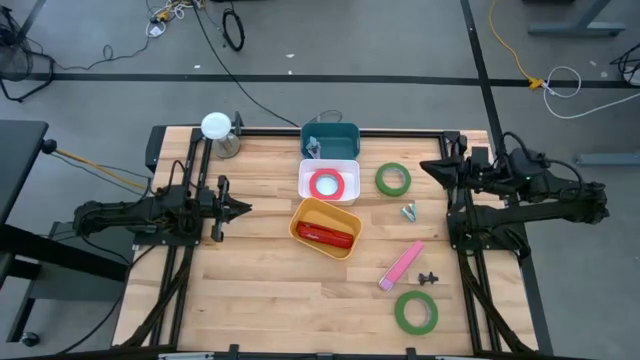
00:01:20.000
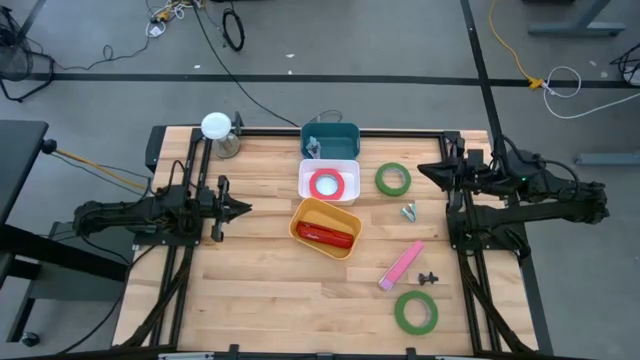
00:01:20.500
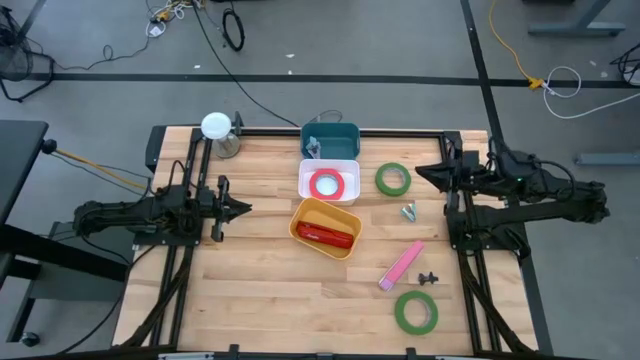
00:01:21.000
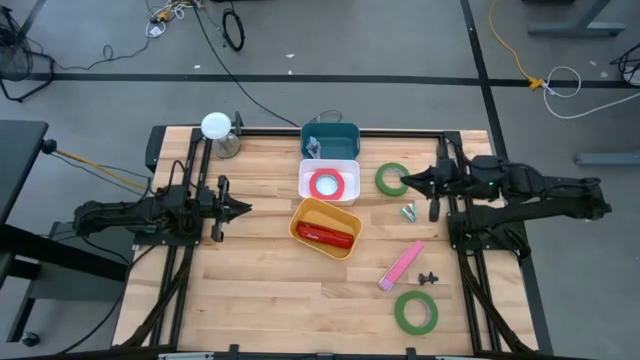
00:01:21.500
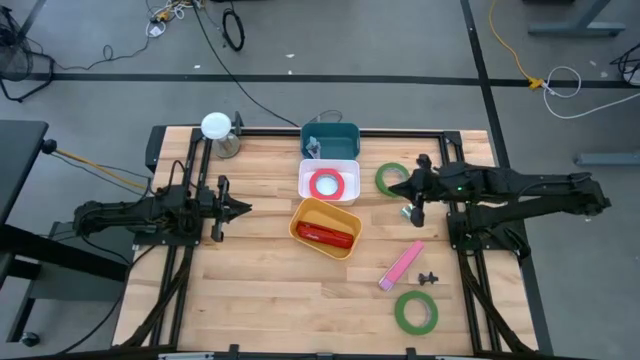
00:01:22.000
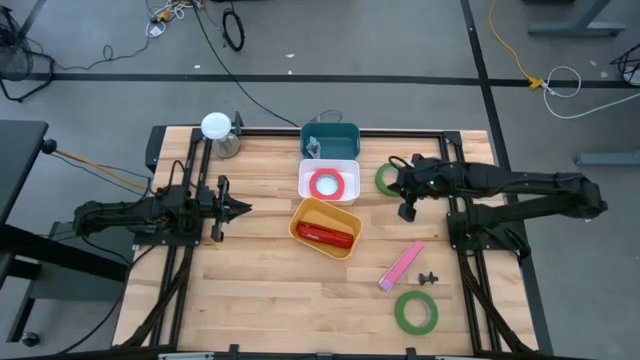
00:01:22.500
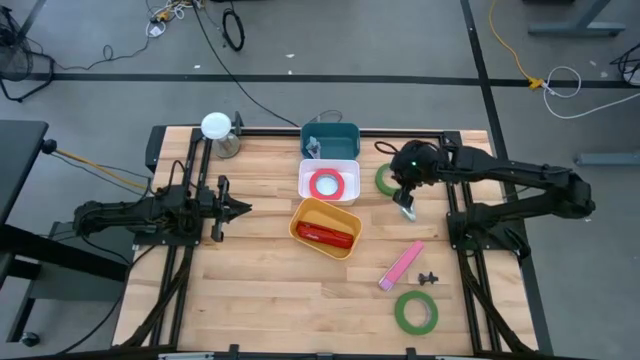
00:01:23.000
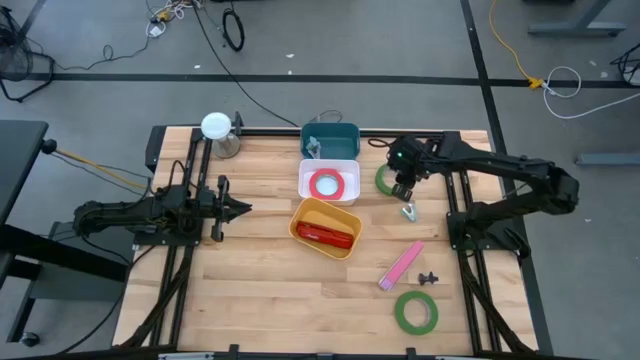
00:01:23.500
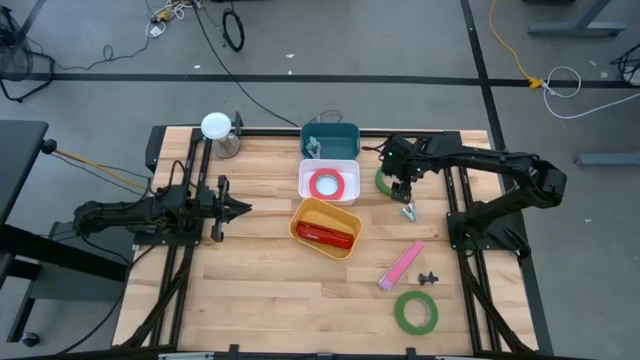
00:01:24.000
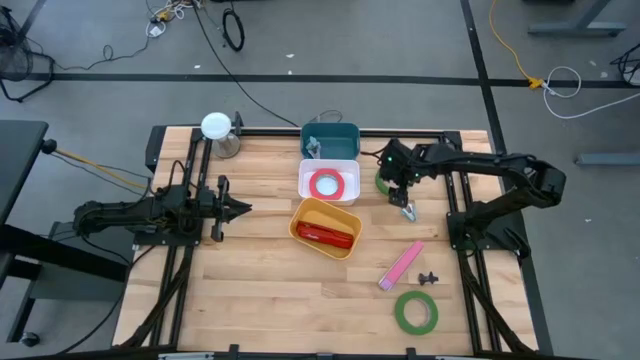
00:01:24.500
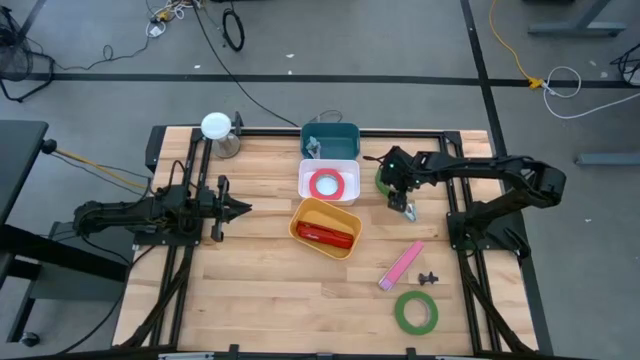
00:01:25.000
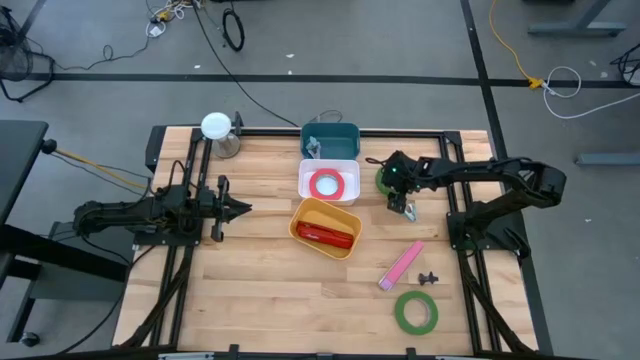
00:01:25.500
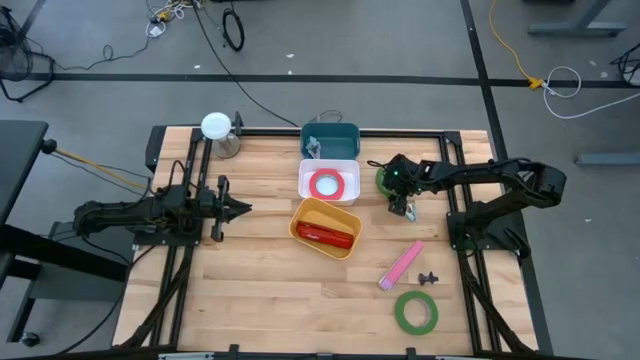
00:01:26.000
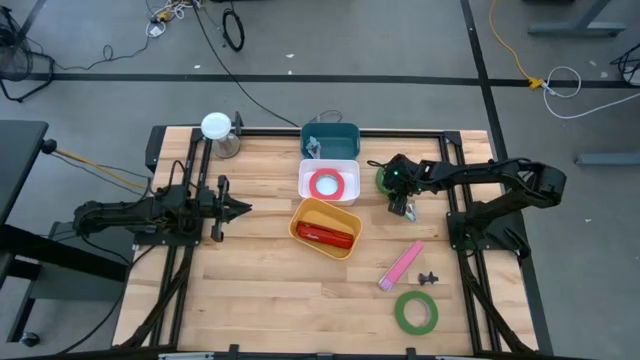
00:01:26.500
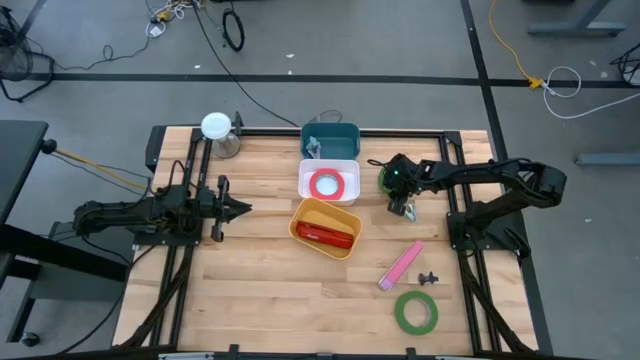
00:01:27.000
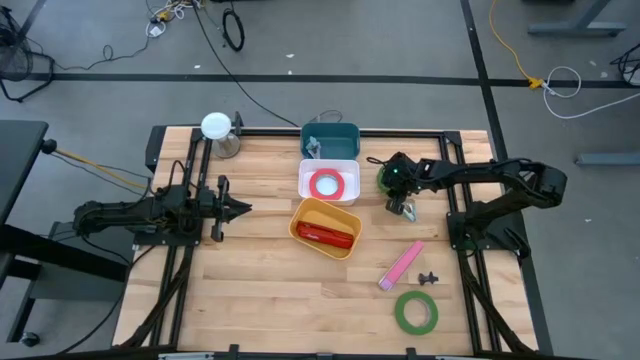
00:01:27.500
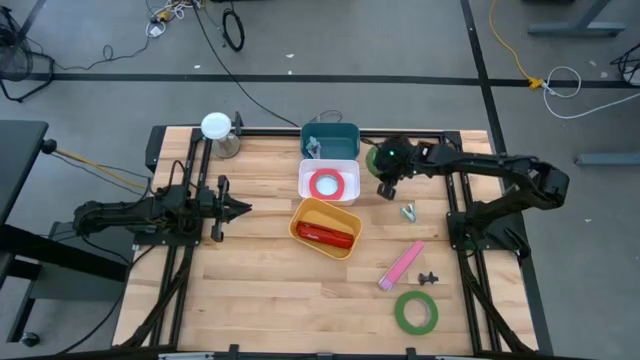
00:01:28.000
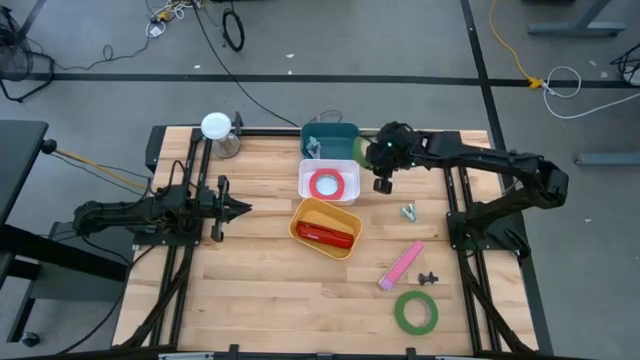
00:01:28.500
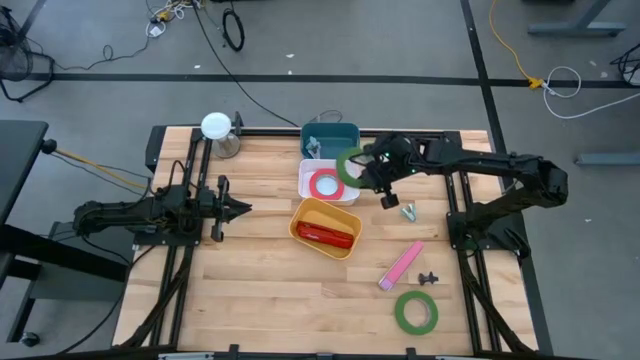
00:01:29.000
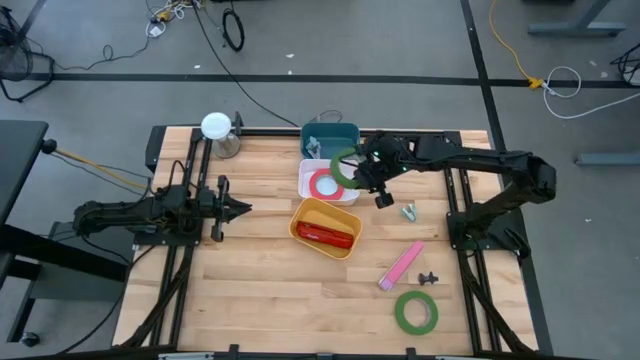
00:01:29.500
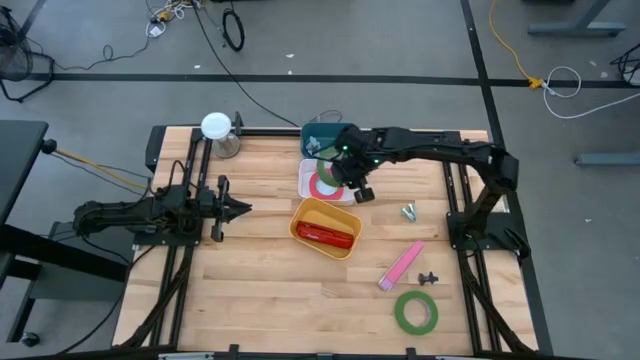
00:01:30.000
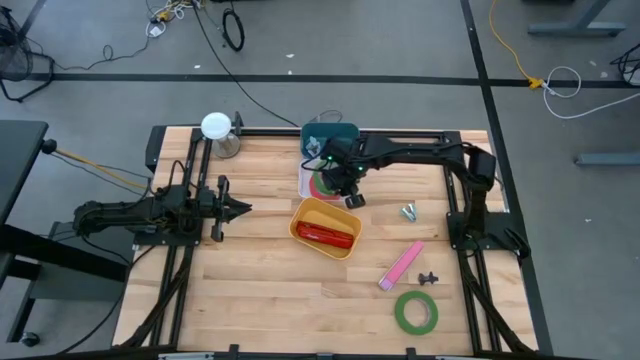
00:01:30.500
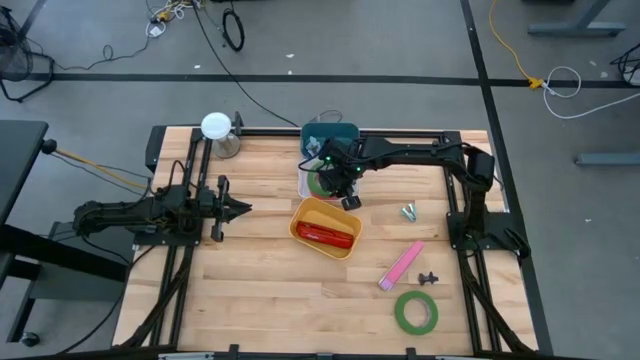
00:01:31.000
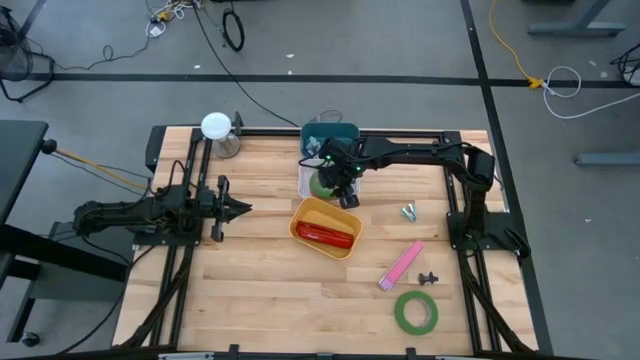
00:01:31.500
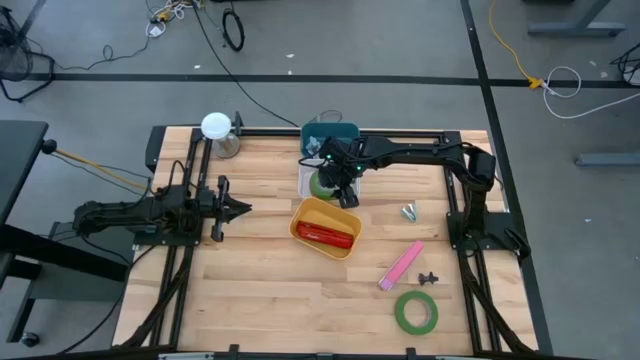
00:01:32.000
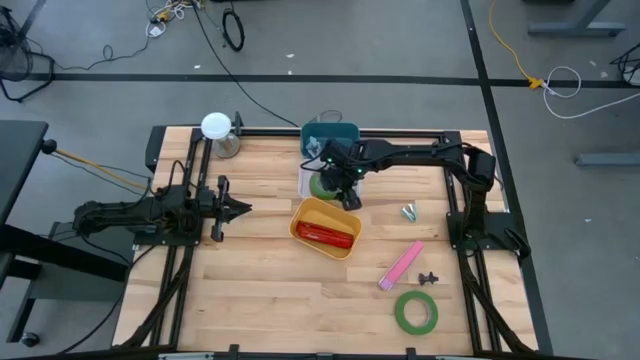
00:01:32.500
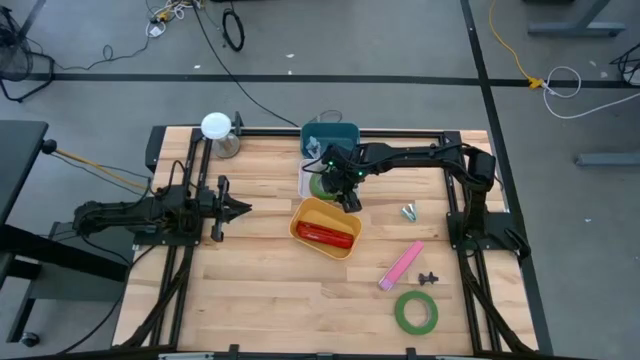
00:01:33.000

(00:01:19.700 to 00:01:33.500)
Task: Pick and place Stapler, Stapler remover, tape
Put the top green tape into the white bin

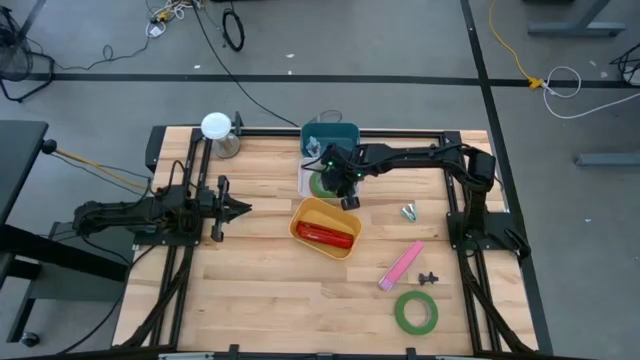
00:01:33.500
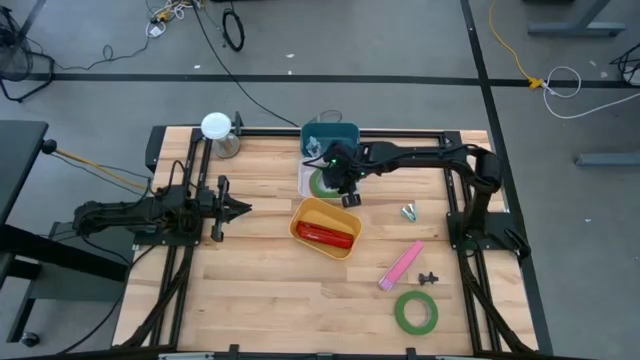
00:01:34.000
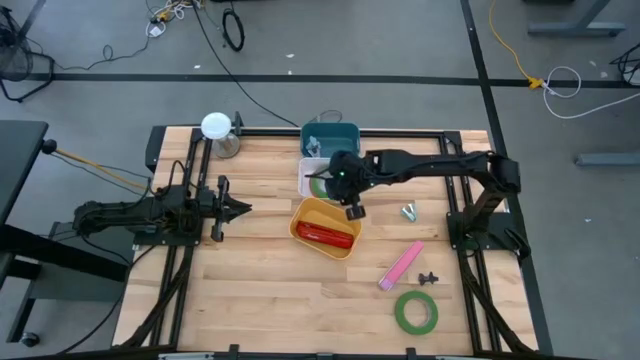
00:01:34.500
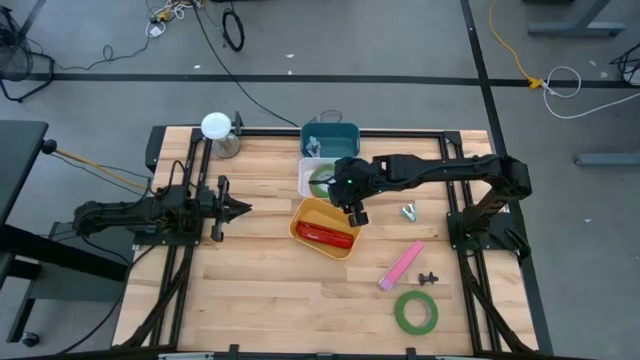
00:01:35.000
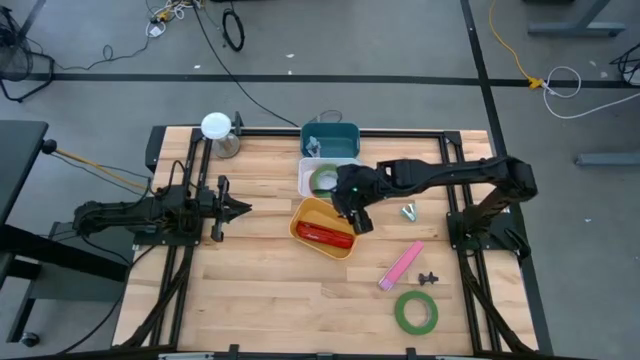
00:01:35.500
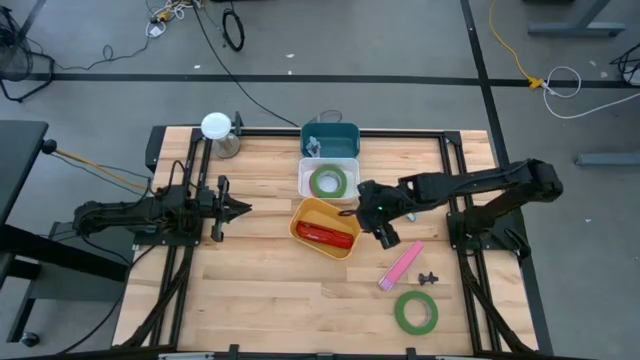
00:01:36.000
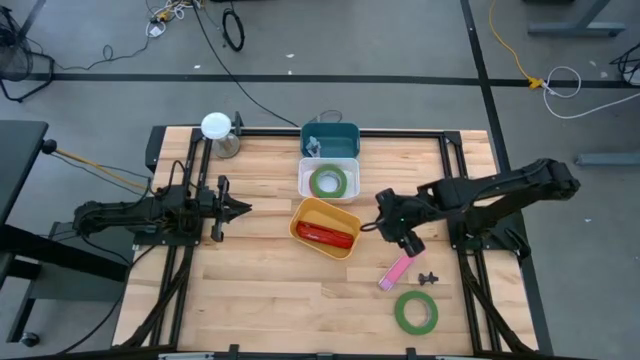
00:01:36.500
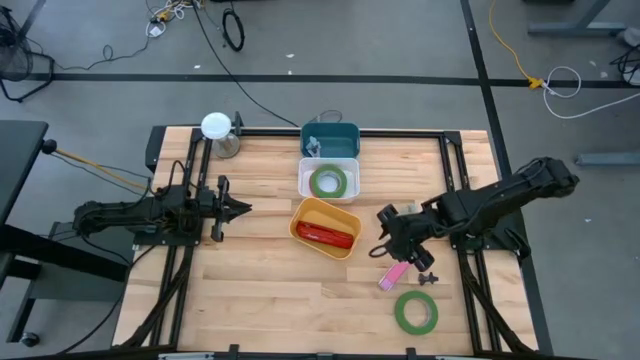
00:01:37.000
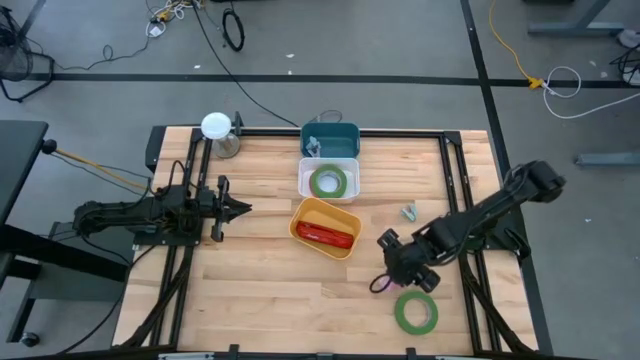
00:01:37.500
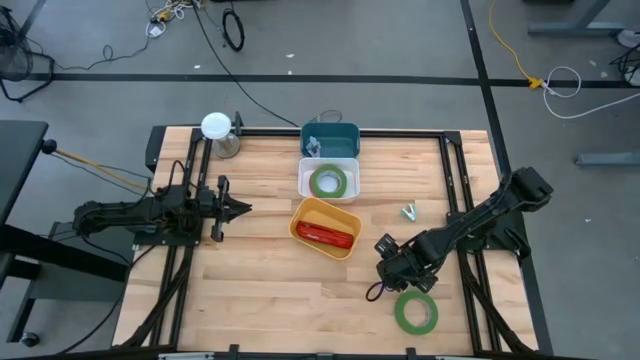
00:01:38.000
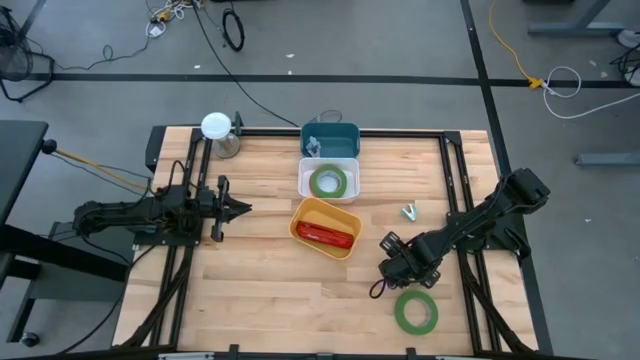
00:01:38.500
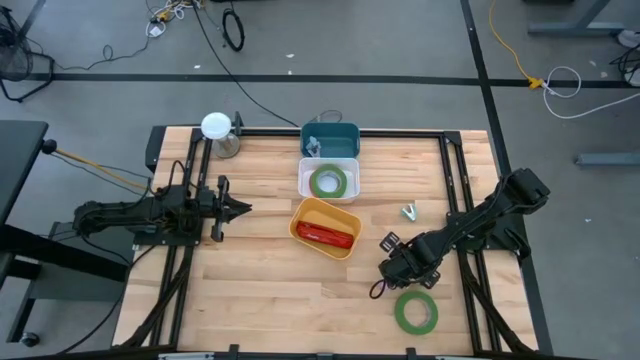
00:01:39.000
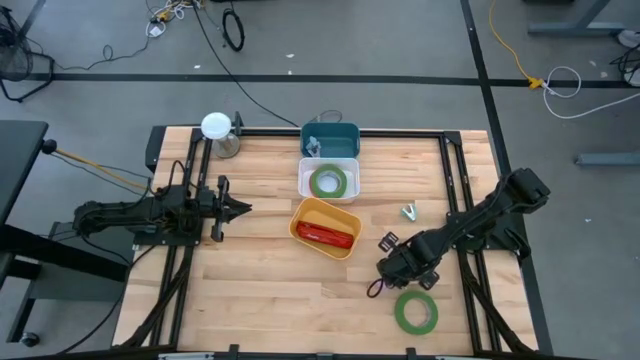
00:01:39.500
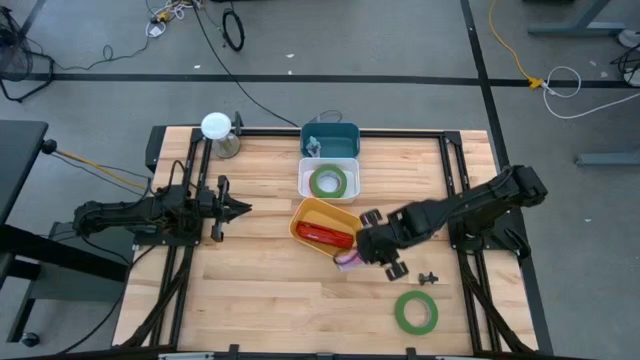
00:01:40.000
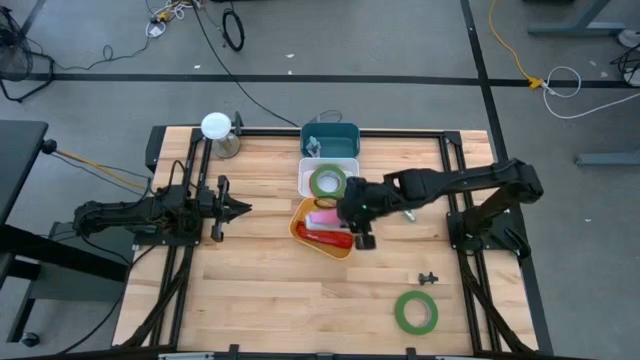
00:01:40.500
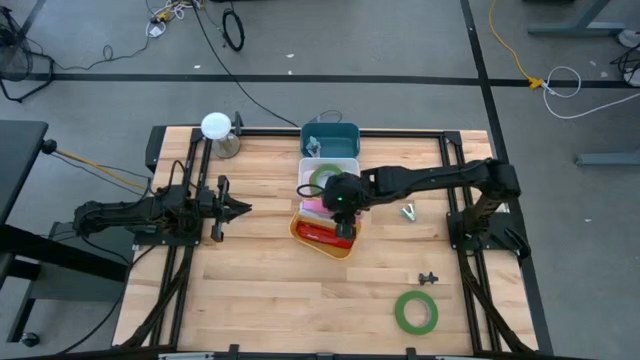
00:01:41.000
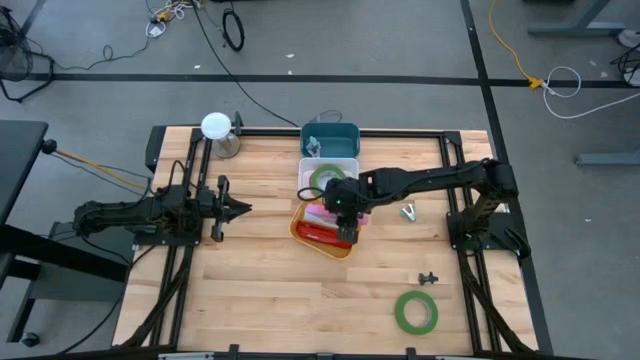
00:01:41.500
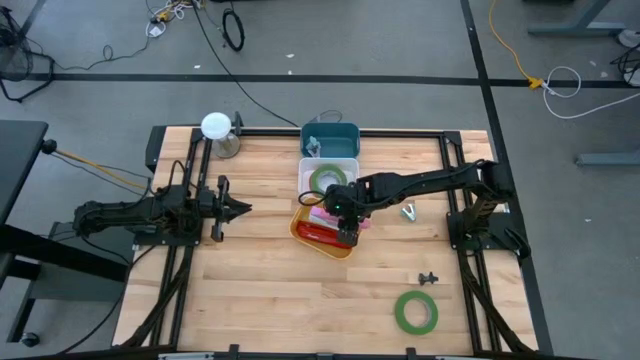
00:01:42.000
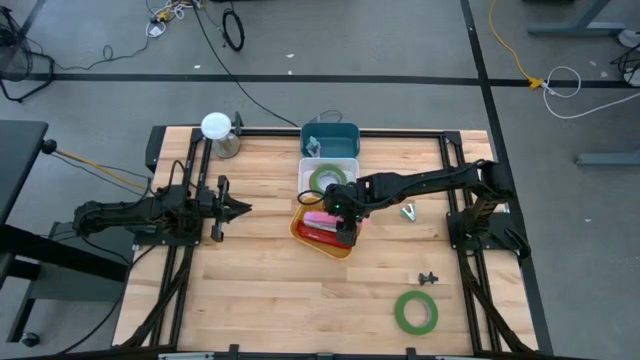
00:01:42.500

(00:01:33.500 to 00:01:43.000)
Put the pink stapler into the yellow bin
